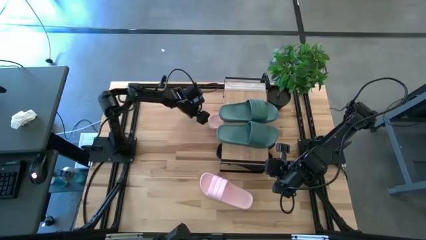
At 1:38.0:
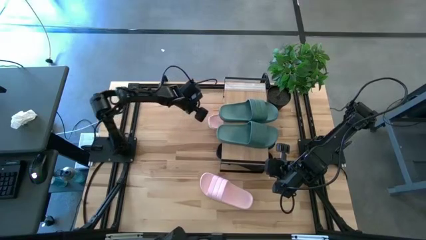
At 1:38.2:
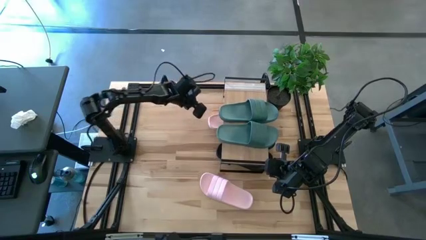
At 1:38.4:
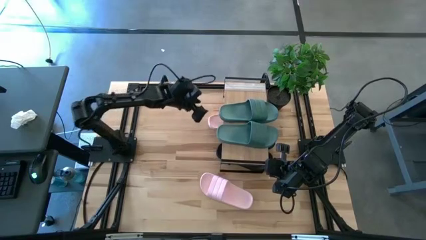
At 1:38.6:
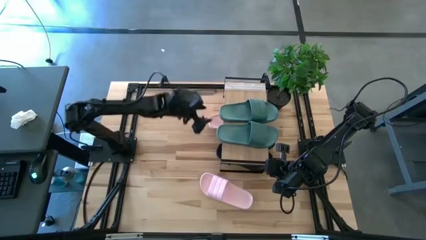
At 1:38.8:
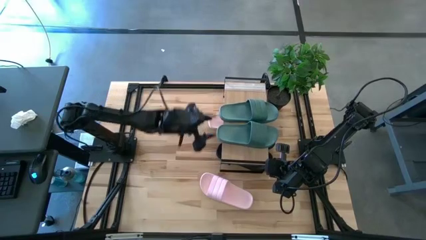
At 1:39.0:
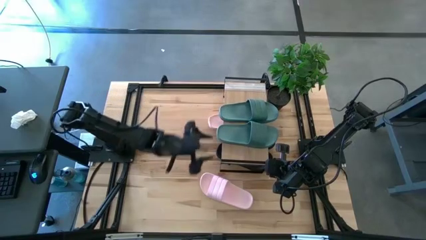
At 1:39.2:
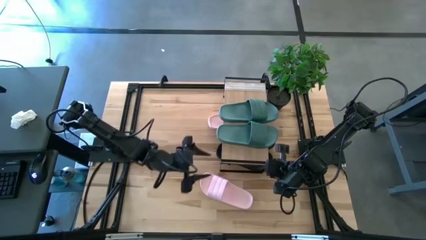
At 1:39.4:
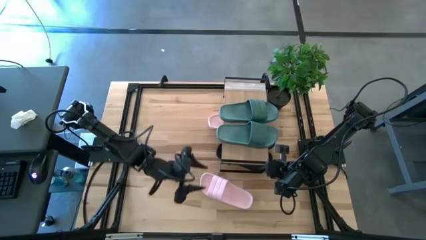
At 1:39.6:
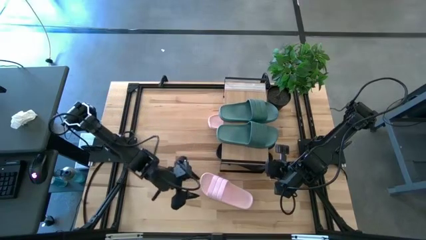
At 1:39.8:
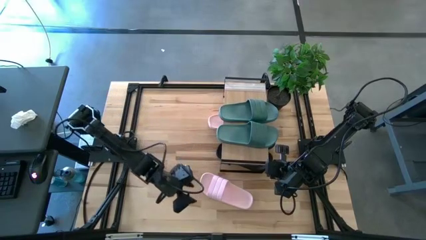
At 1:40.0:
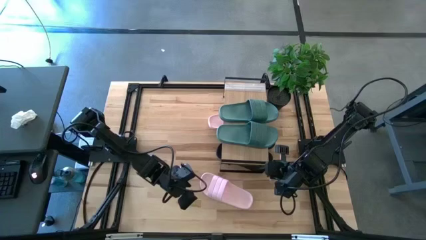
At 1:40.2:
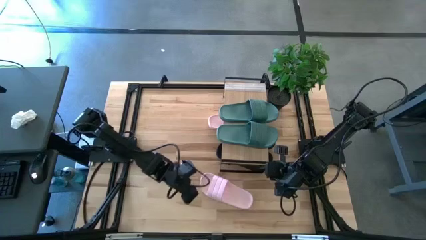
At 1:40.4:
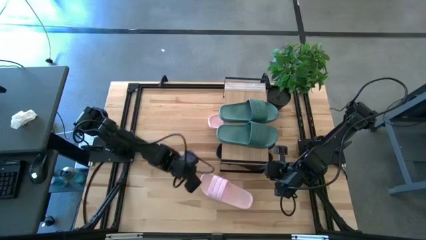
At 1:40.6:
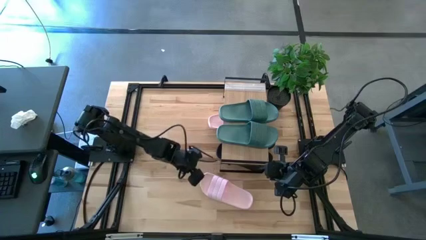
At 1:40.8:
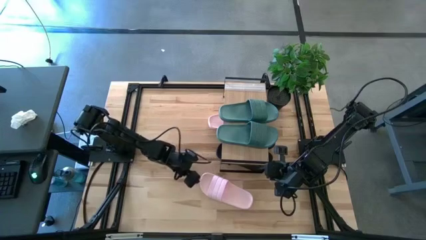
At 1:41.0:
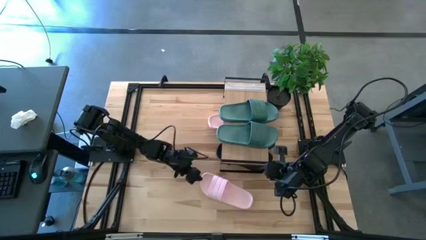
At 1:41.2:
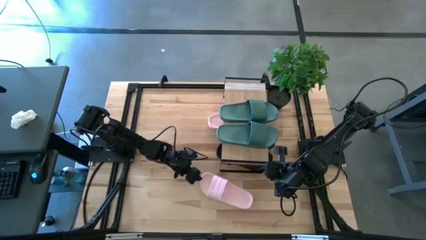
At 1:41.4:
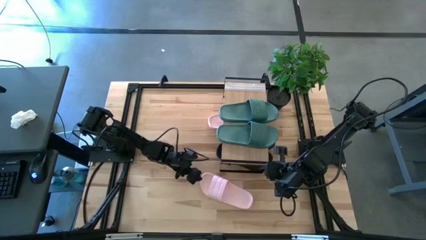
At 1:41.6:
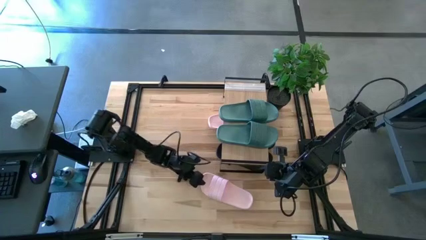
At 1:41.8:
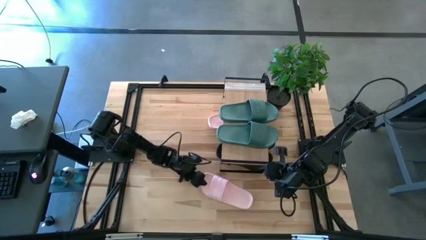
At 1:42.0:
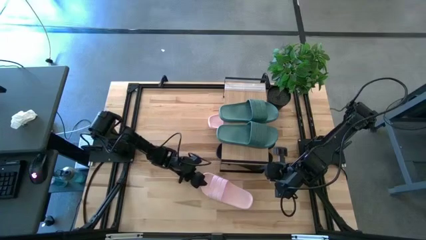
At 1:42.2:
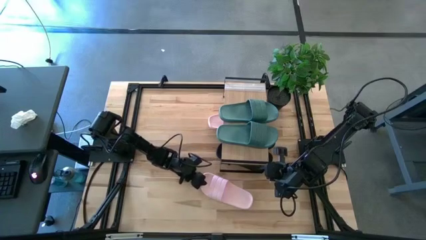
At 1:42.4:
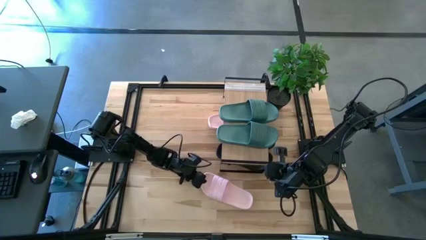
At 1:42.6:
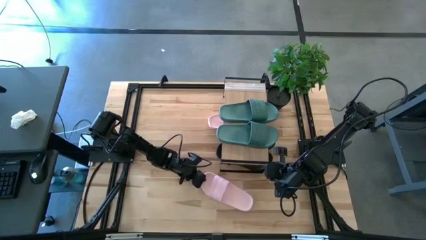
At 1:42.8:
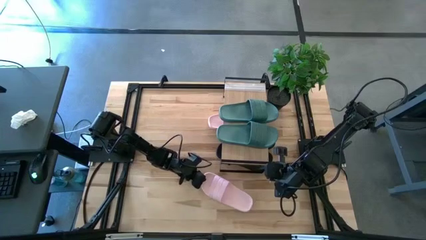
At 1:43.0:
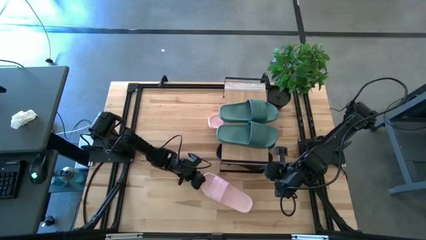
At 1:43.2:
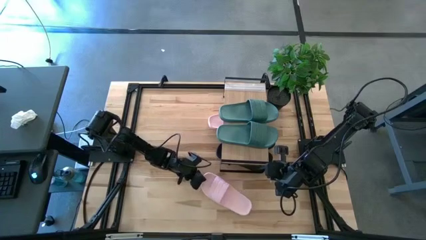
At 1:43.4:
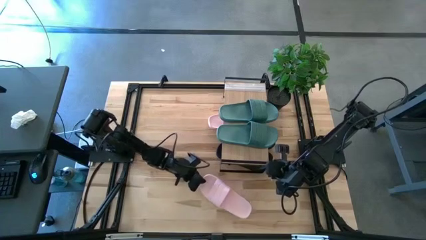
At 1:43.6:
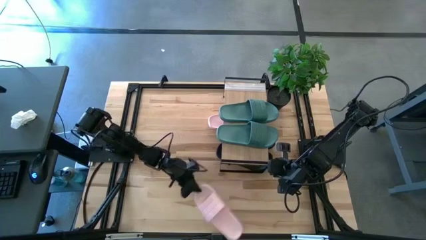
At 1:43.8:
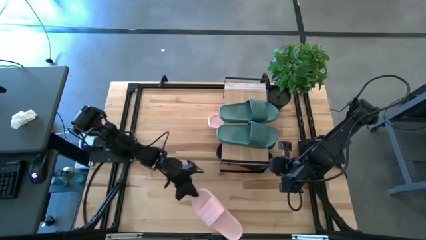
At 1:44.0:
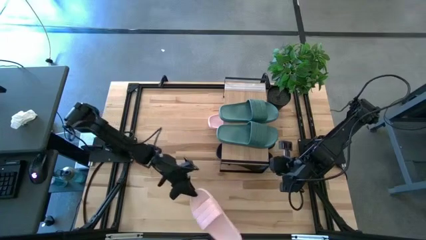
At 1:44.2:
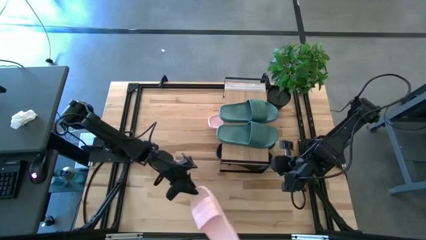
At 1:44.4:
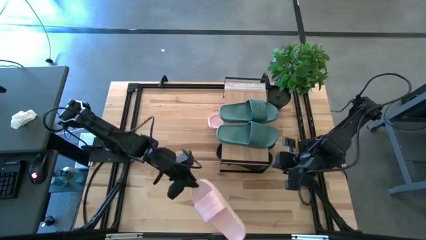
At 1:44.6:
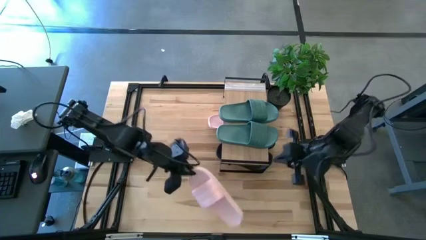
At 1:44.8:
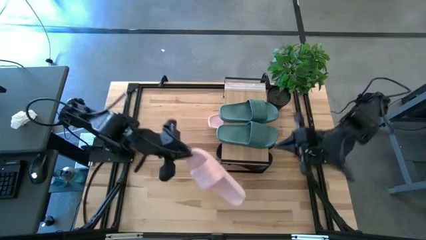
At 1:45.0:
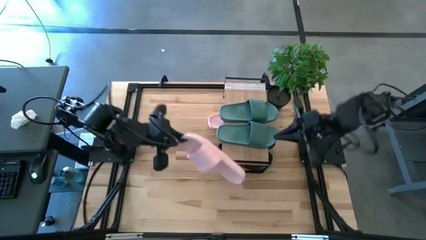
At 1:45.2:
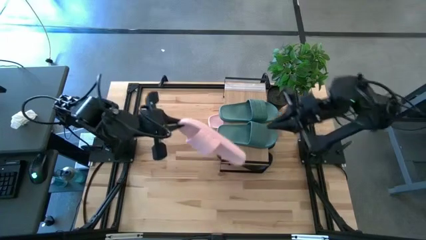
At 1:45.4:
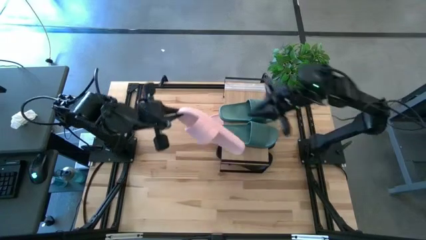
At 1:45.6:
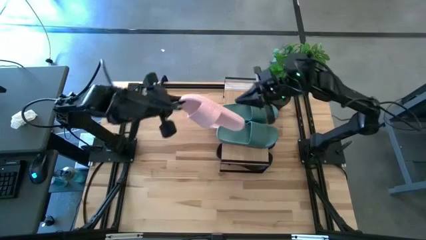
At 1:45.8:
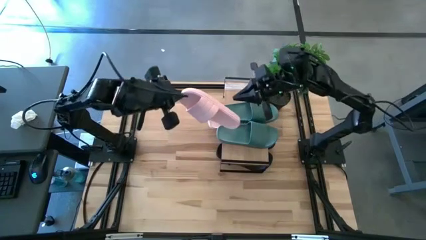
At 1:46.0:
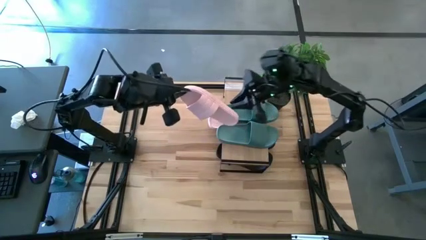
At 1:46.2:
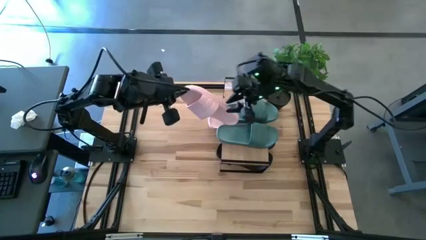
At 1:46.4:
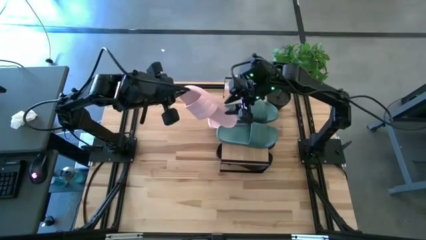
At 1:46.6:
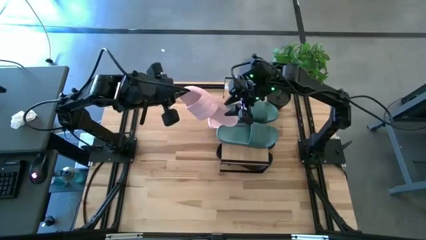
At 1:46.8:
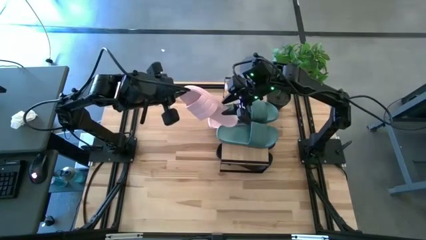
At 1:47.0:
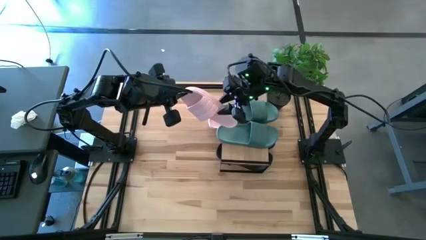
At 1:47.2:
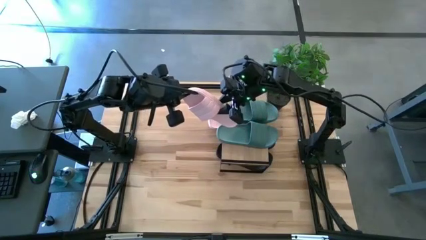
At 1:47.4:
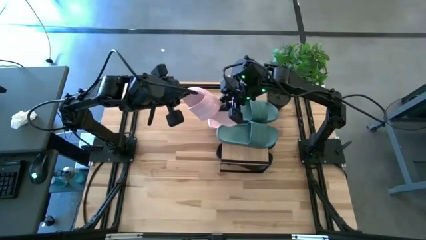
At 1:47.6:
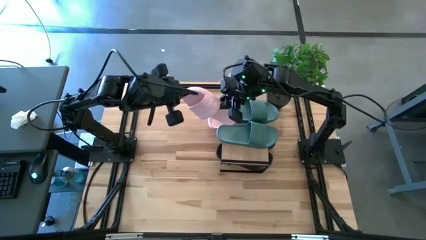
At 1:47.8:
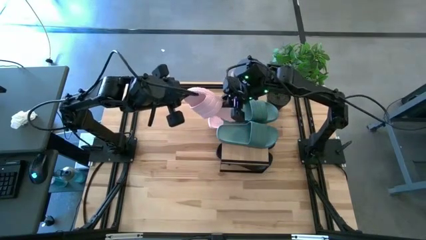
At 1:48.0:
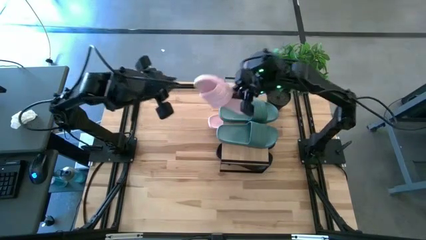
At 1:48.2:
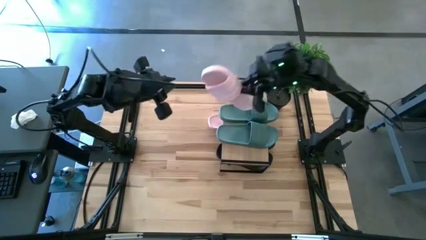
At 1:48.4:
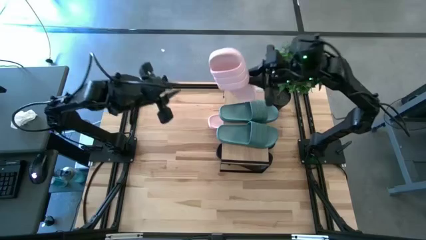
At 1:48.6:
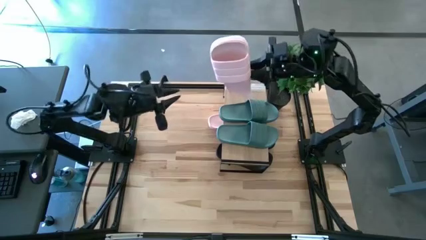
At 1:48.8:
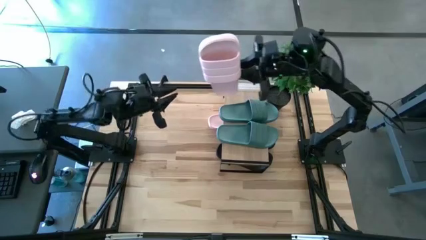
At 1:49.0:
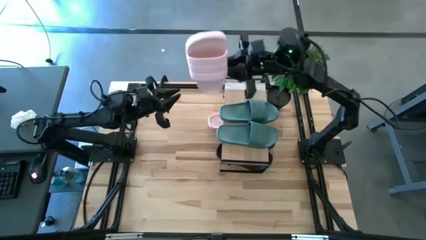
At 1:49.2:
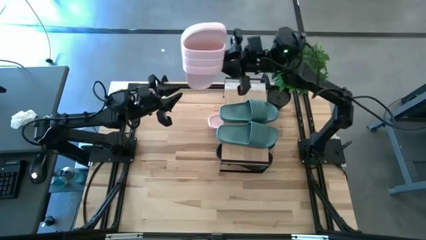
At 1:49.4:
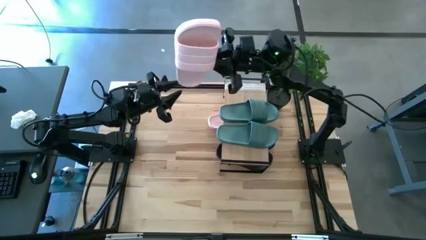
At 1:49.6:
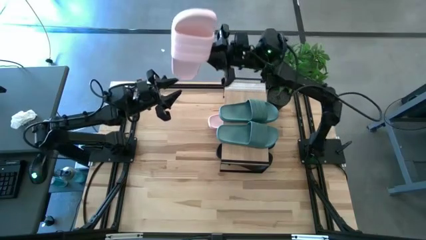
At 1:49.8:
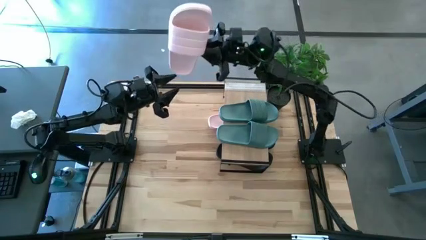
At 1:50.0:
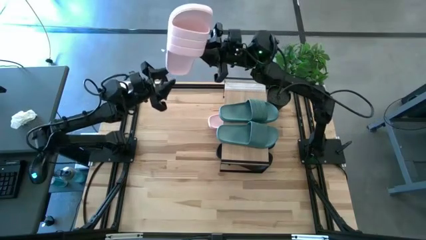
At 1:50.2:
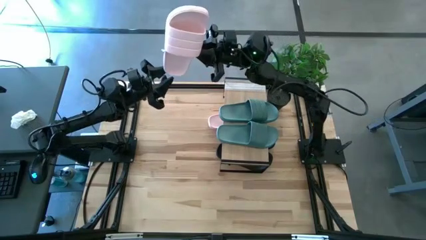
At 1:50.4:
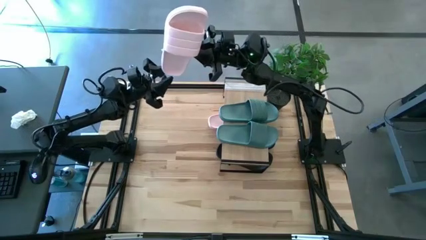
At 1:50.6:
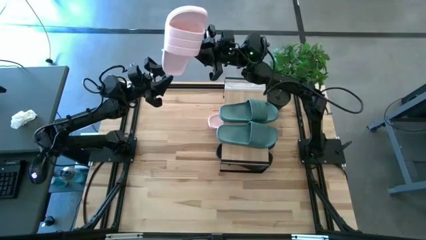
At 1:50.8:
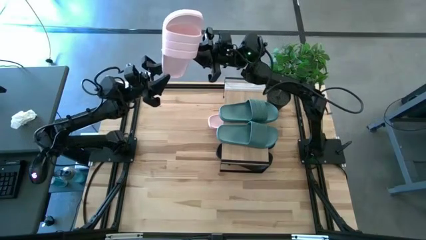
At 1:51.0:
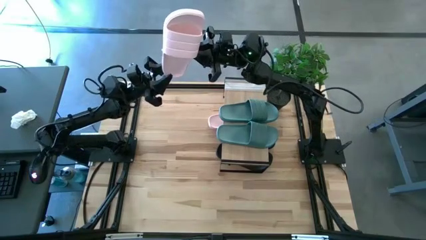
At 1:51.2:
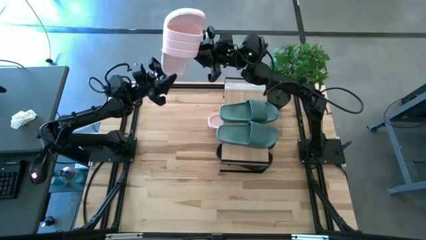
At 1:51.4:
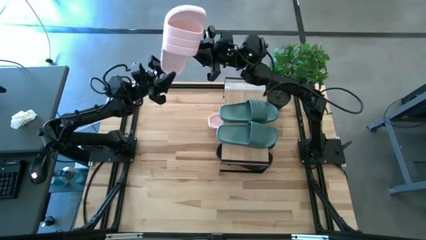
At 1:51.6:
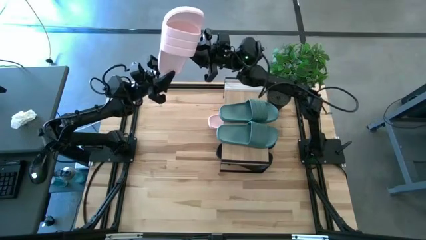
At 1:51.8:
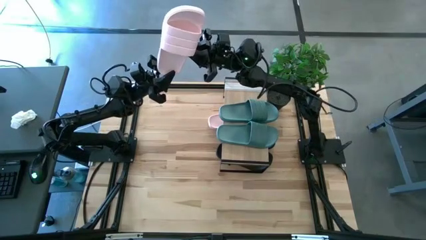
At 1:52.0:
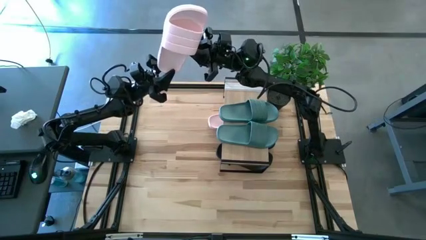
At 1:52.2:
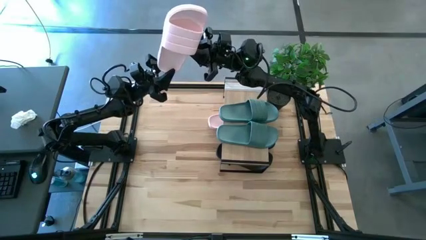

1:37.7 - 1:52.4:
Task: Pick and place slides into the shelf
Put the pink slipper under the shelf
